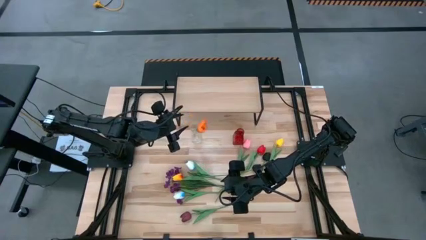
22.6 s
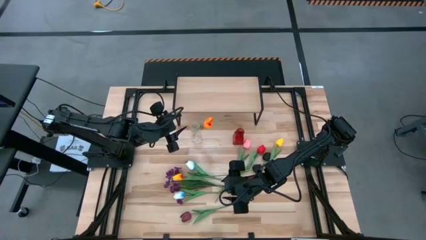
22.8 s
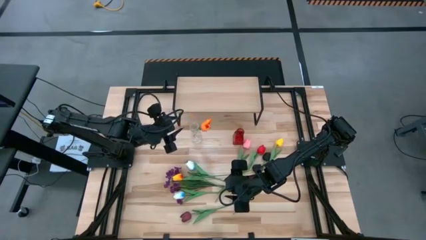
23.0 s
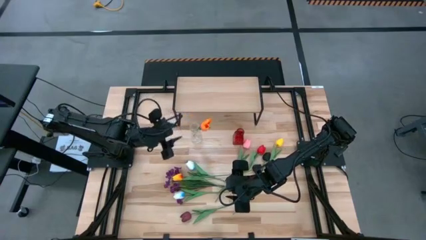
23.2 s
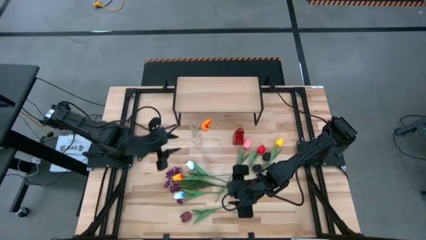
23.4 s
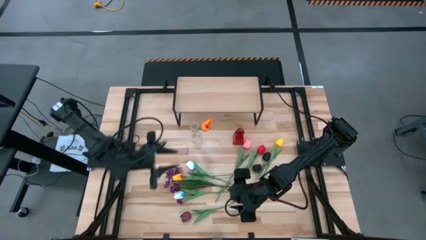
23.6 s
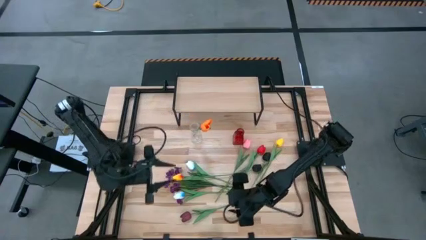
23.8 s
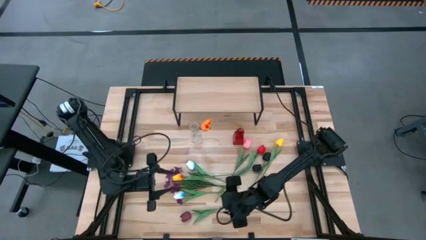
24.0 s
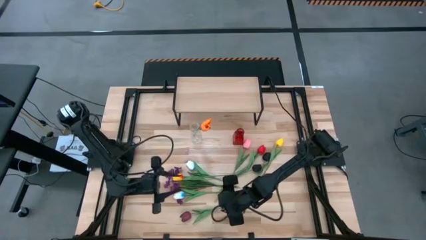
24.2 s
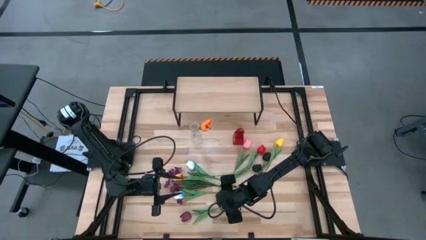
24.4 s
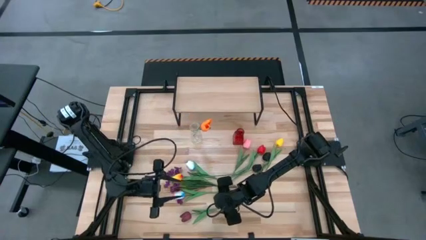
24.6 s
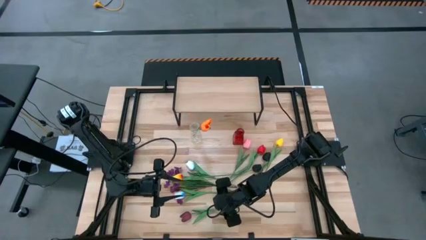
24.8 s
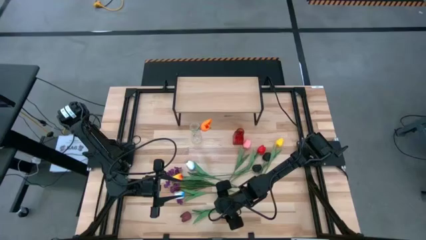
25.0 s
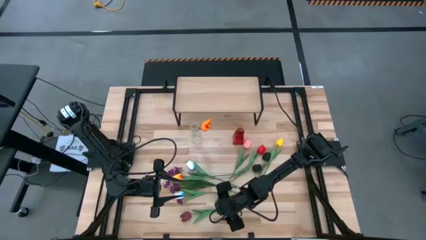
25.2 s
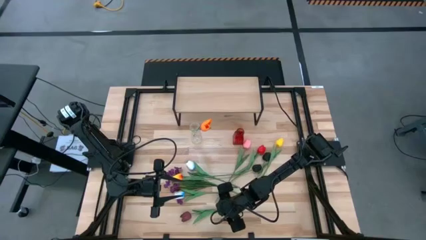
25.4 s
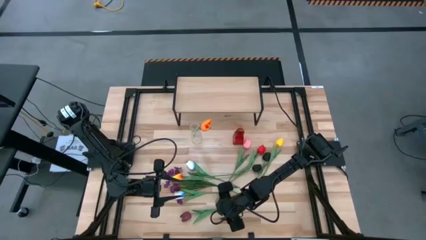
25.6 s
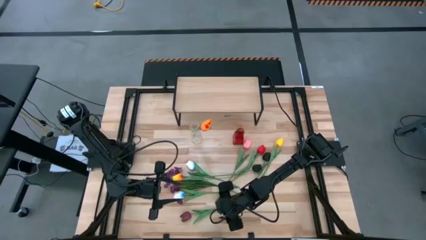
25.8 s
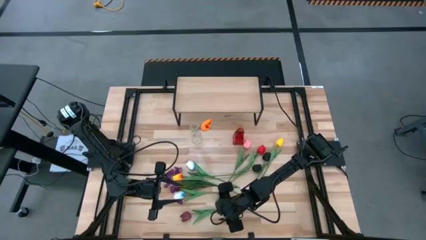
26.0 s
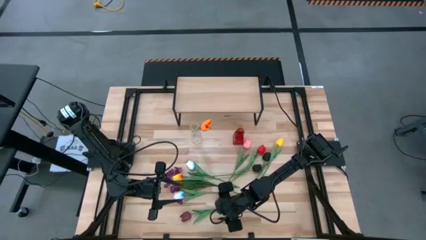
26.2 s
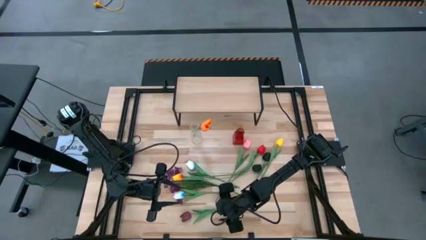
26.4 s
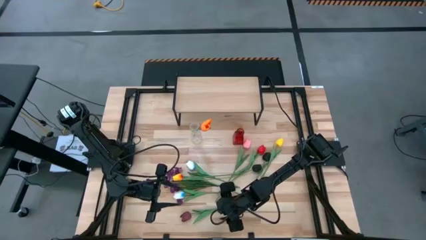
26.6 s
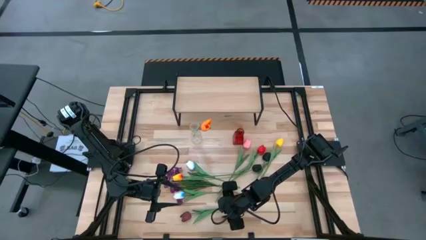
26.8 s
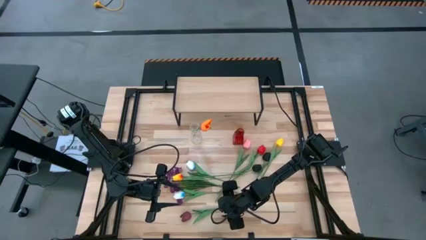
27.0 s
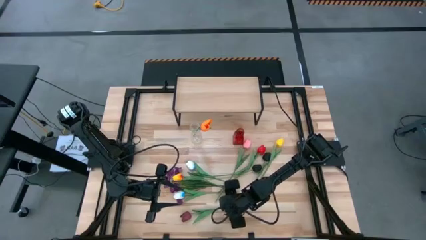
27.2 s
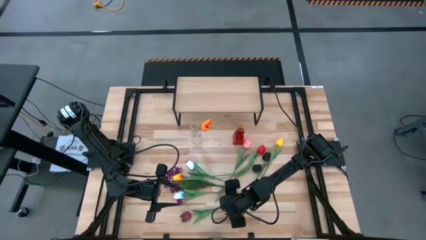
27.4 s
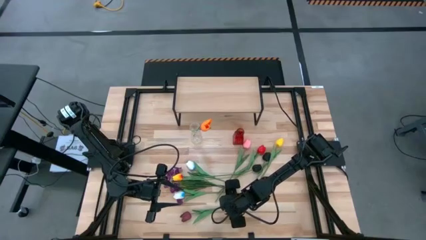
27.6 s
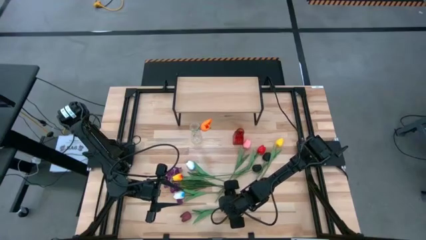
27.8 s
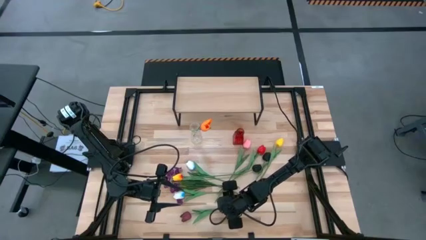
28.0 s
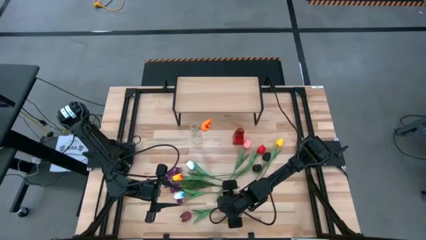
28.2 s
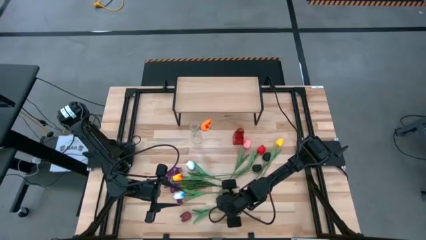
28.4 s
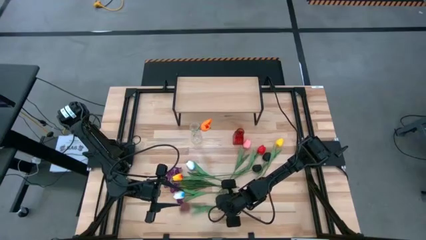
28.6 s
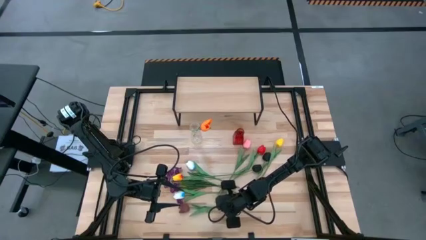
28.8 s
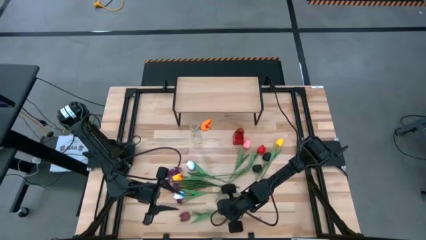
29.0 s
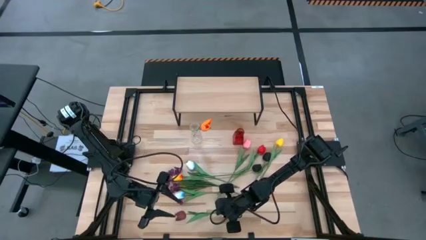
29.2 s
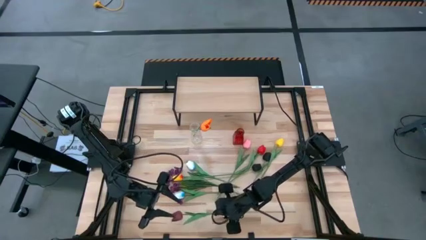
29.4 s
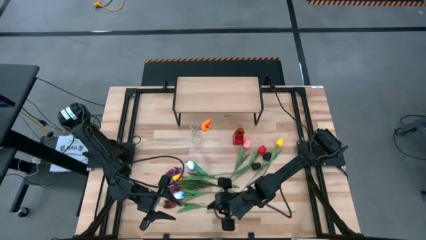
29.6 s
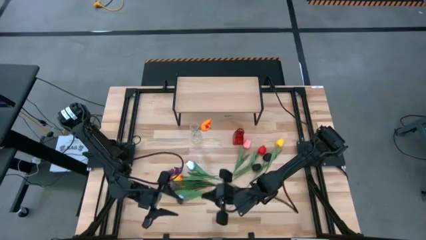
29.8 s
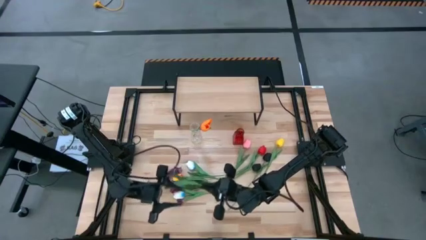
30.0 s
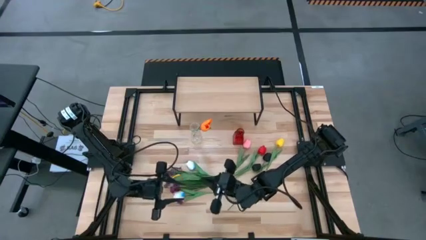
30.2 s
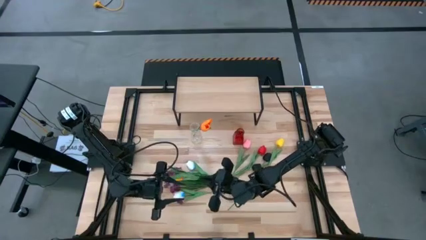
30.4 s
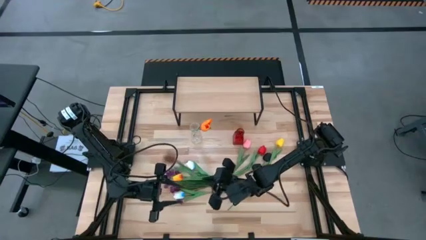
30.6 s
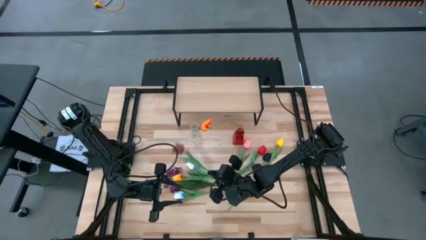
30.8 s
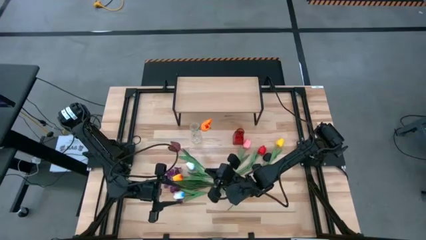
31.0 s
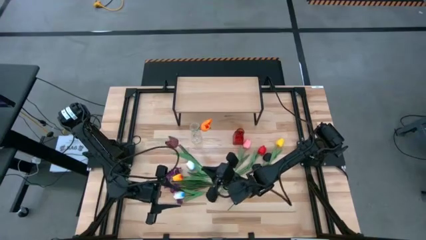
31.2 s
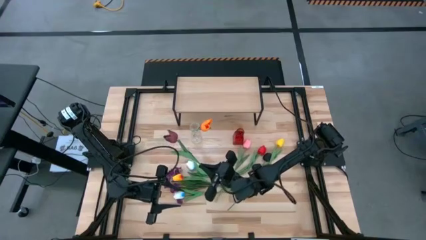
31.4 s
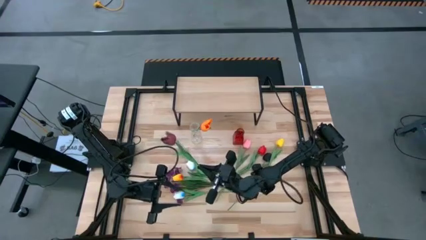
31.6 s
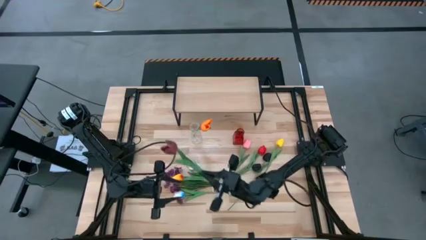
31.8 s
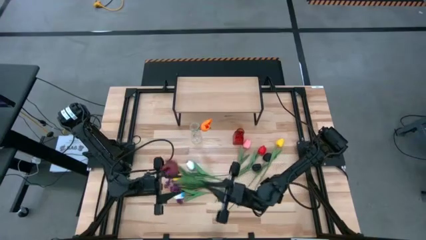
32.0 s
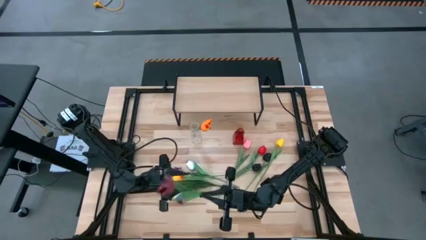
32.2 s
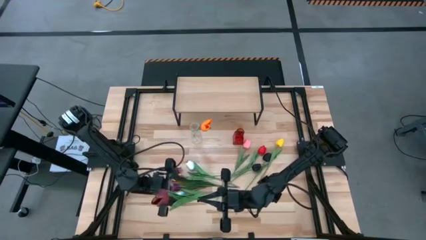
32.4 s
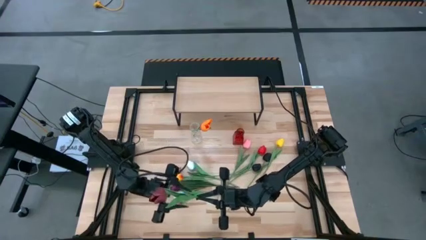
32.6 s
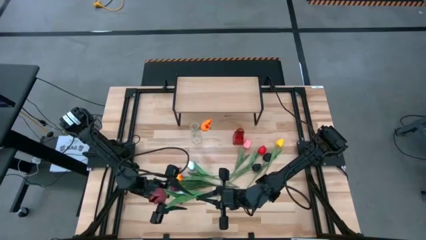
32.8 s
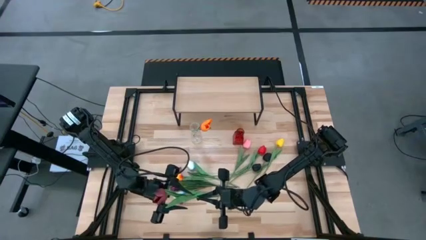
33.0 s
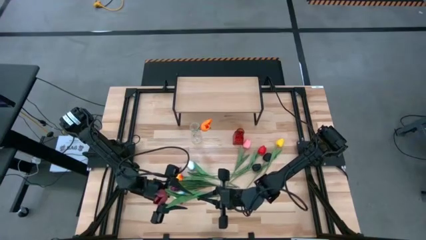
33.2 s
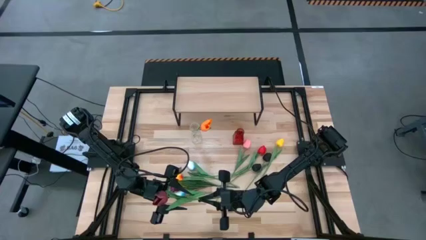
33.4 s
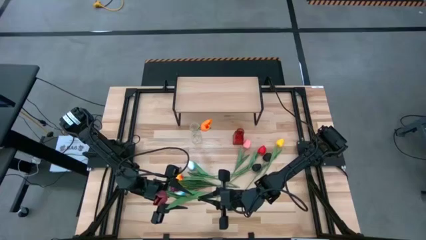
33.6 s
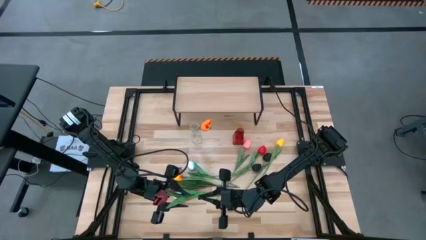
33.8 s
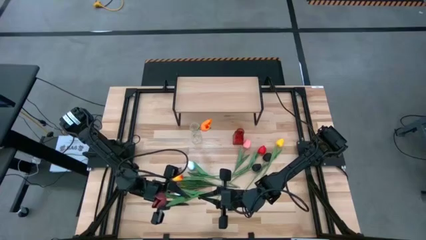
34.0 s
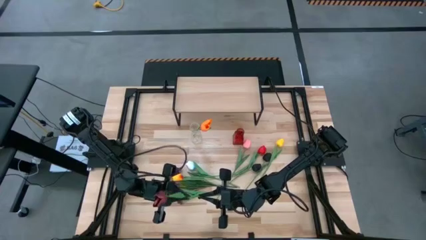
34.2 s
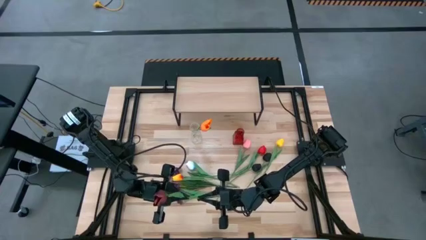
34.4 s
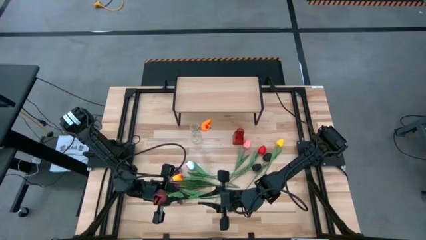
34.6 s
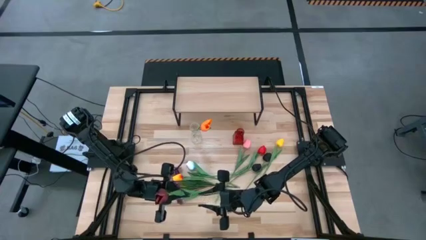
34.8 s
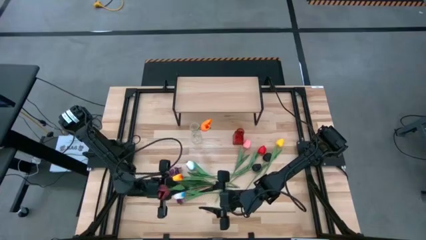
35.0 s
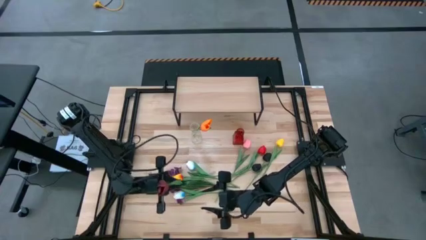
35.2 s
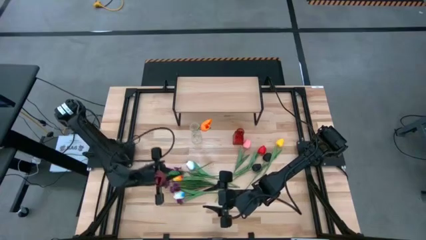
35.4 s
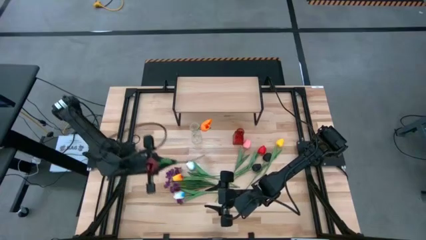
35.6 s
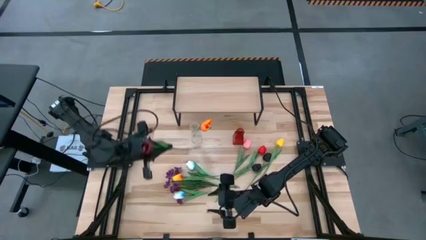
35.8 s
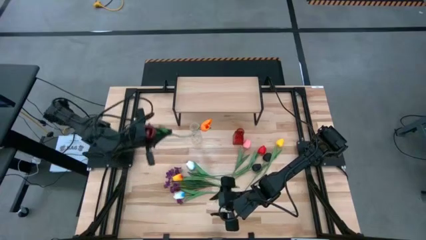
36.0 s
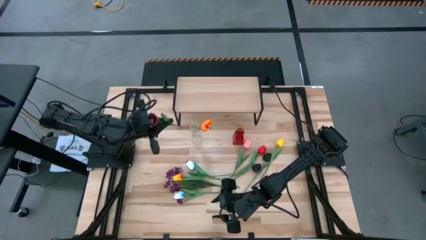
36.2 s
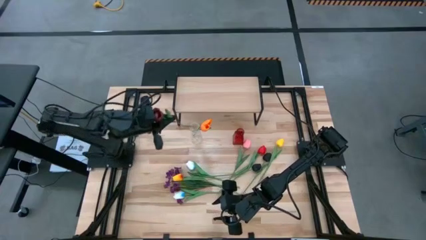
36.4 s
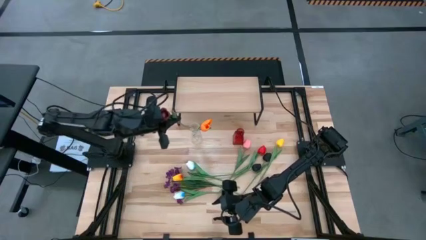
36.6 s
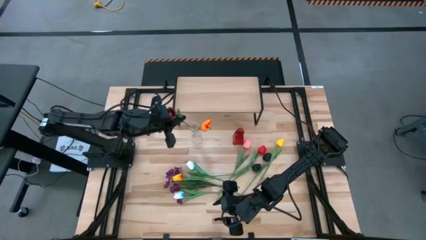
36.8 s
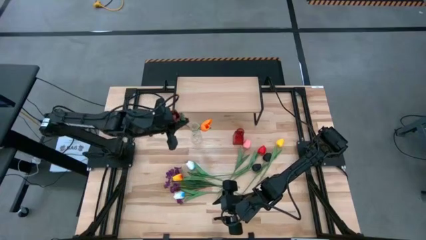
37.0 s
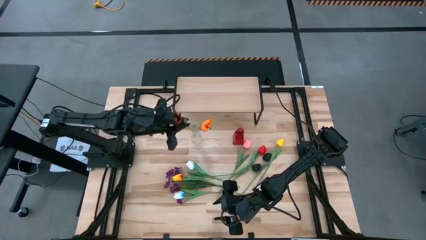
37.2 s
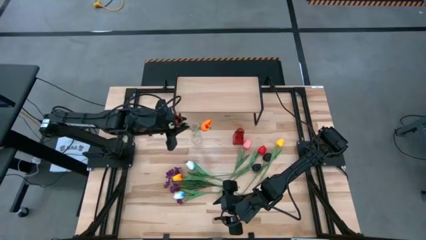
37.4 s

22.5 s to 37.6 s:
Task: Pick and place flowers into a vace then onto a shelf
Put the maroon tulip into the transparent vase

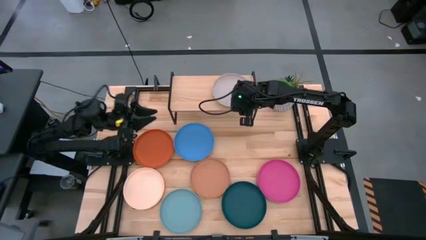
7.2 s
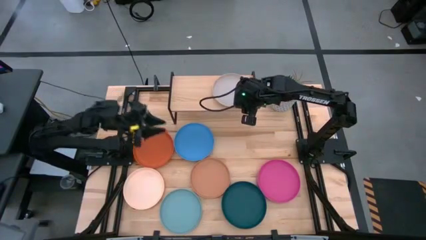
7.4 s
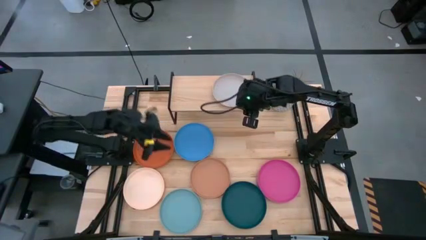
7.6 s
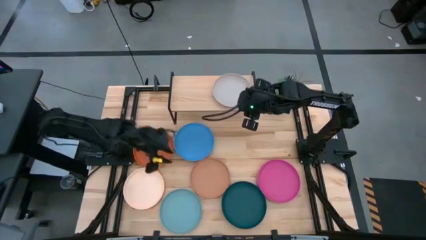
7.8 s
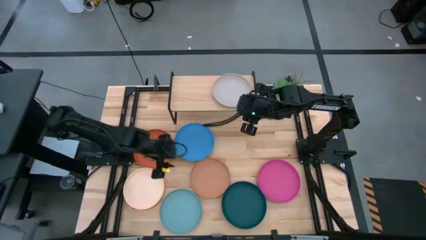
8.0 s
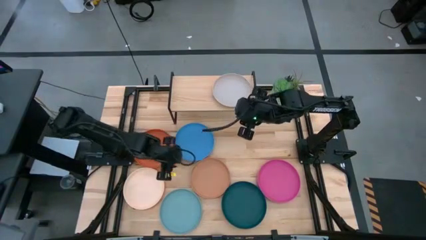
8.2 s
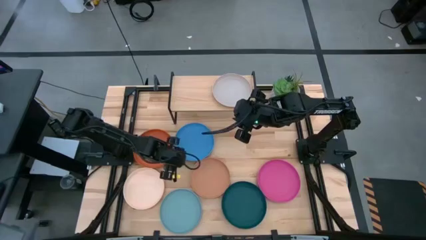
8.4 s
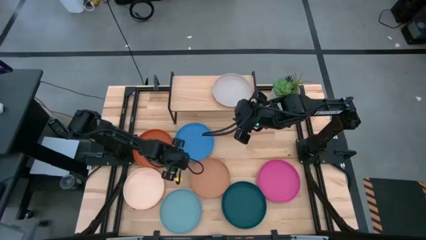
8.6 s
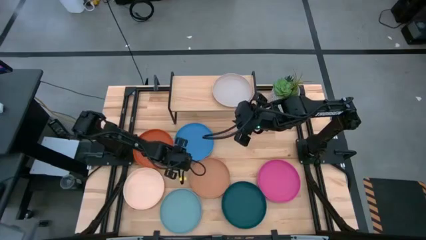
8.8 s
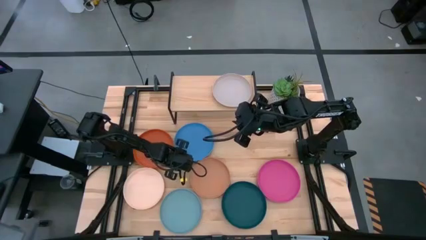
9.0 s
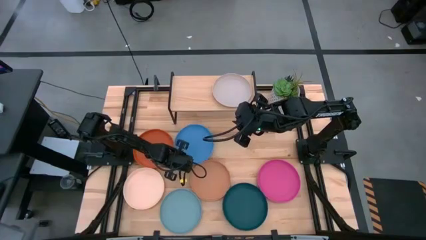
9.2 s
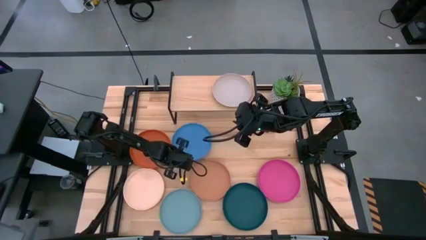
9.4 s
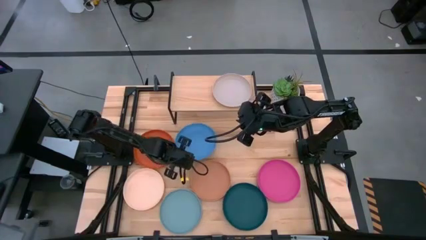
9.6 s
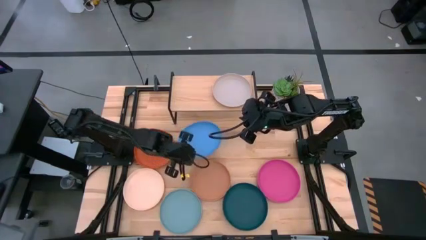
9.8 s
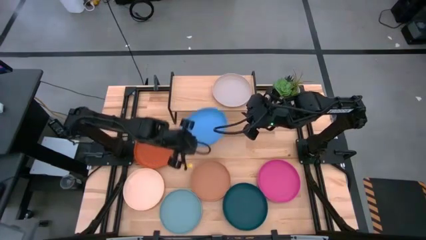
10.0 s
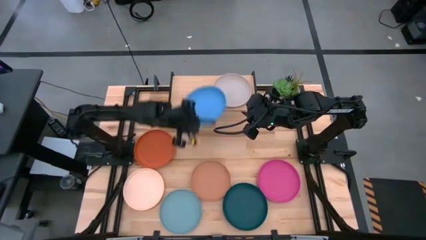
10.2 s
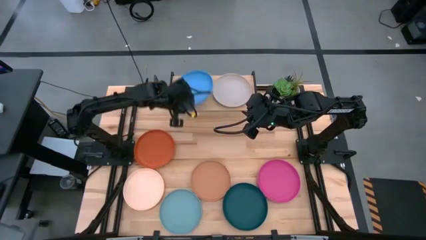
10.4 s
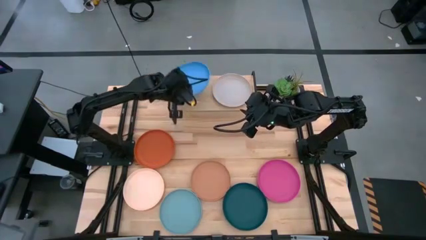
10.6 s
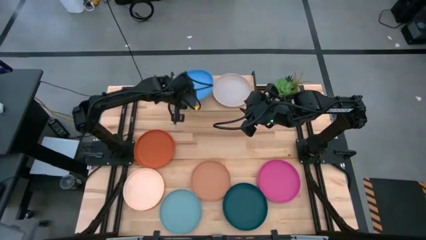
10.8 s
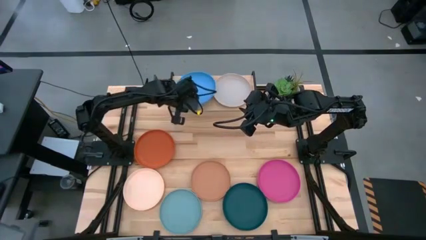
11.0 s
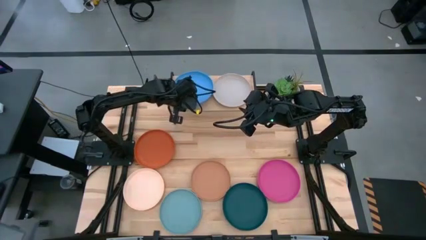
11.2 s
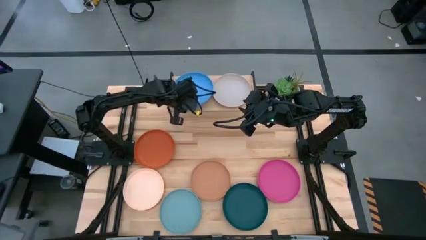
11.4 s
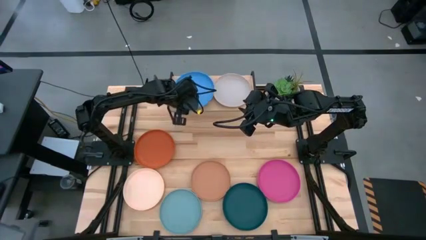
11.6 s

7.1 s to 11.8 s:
Task: Place and stack plates onto a shelf
Put the blue plate on the shelf
